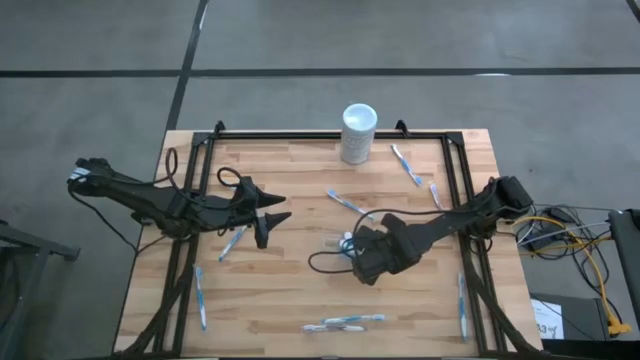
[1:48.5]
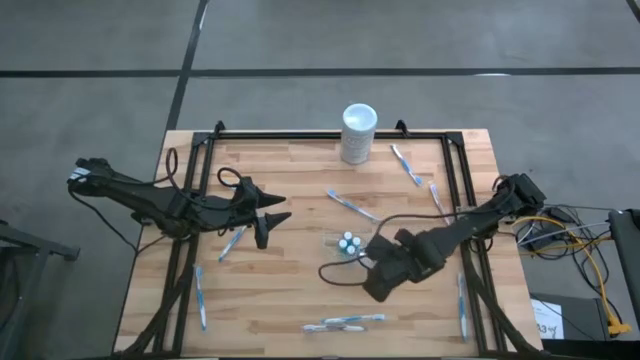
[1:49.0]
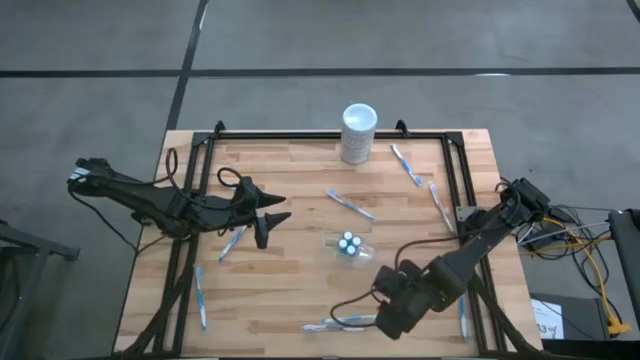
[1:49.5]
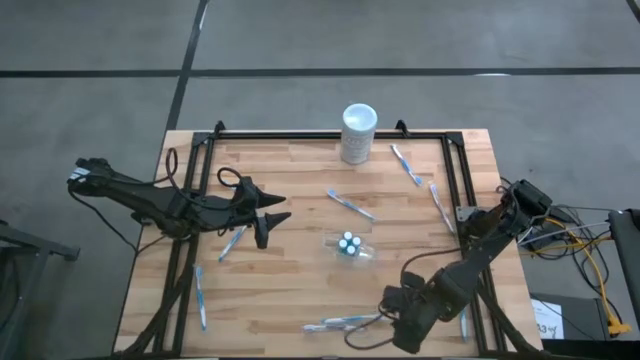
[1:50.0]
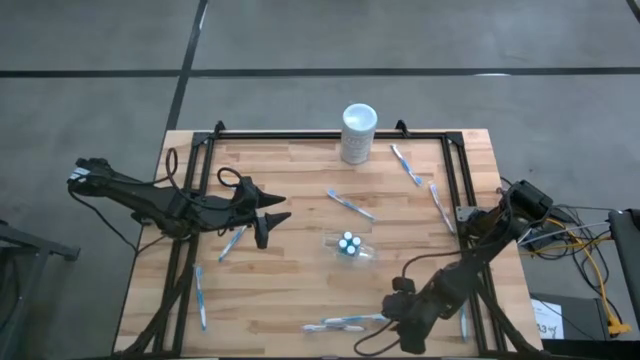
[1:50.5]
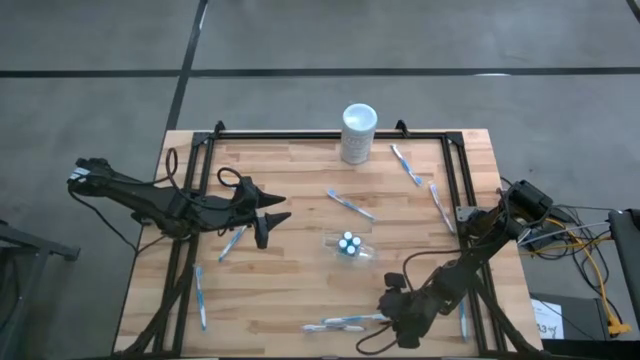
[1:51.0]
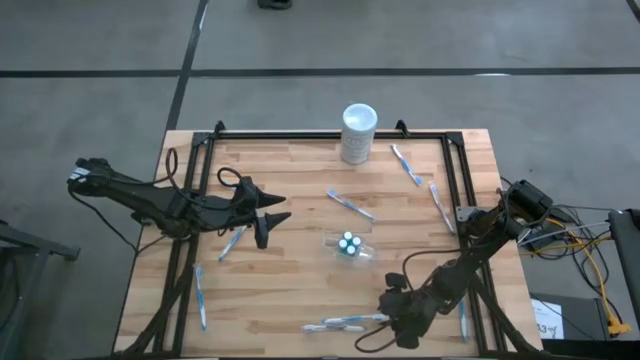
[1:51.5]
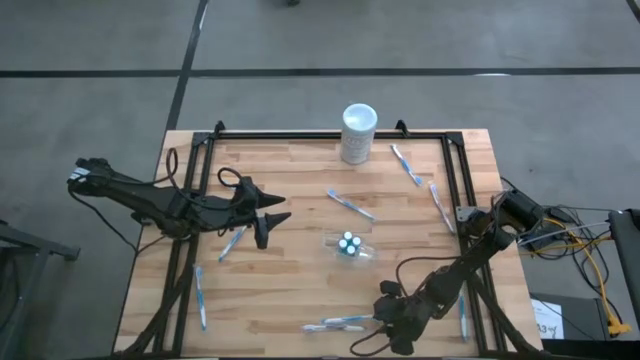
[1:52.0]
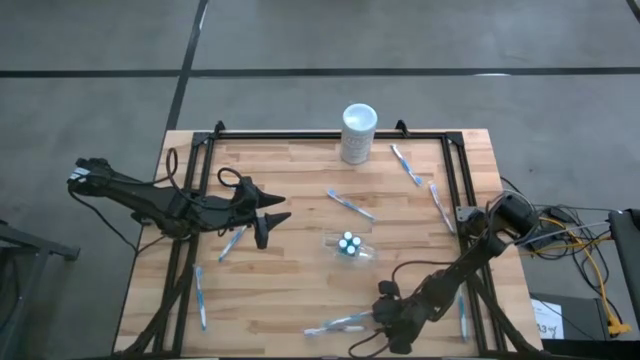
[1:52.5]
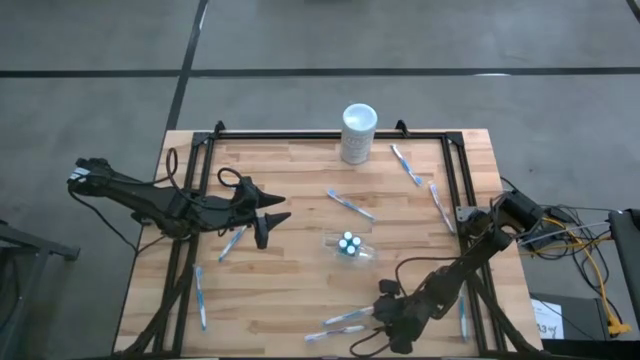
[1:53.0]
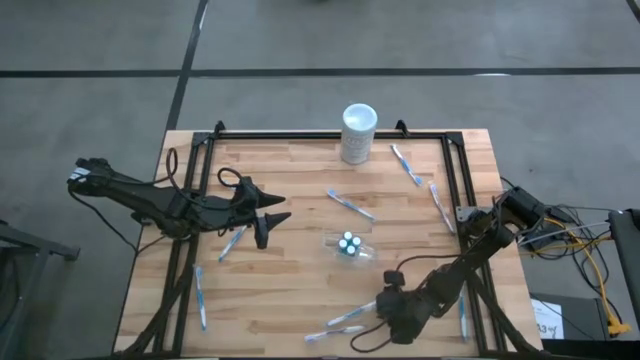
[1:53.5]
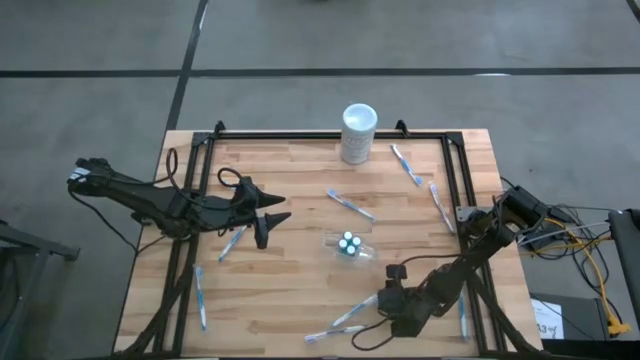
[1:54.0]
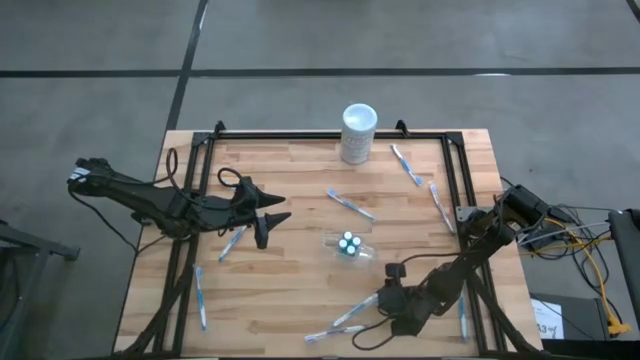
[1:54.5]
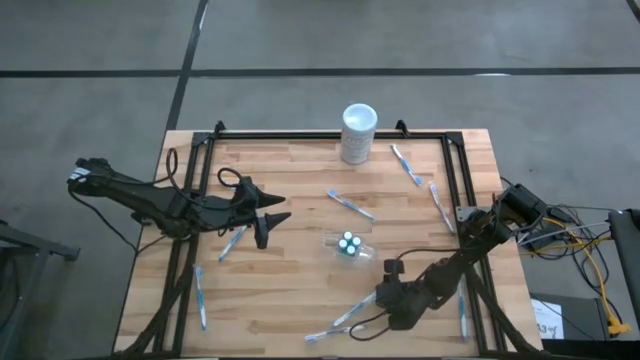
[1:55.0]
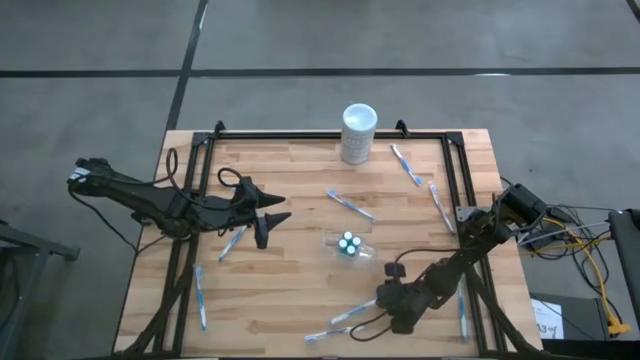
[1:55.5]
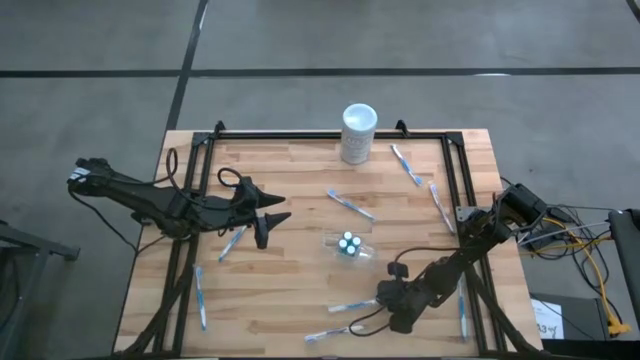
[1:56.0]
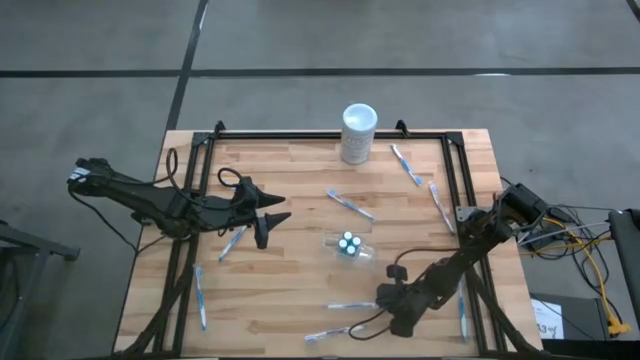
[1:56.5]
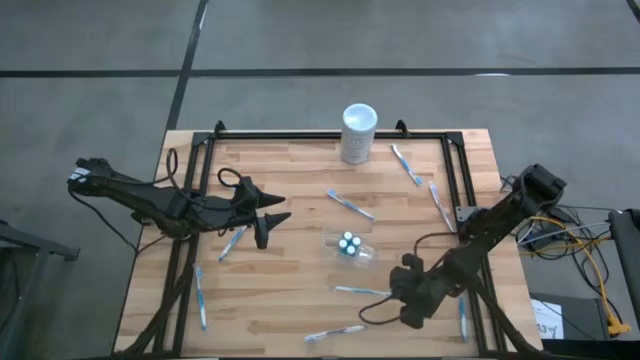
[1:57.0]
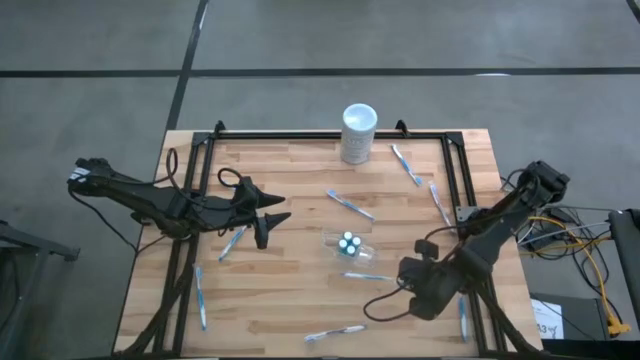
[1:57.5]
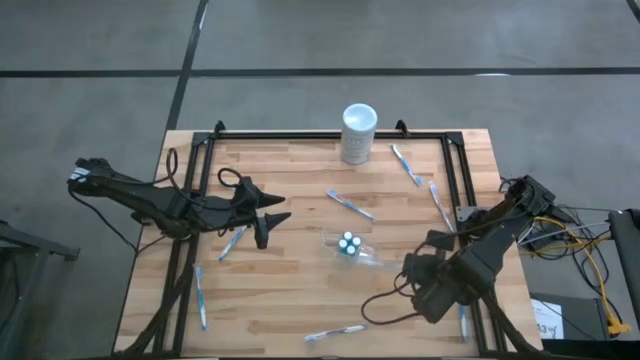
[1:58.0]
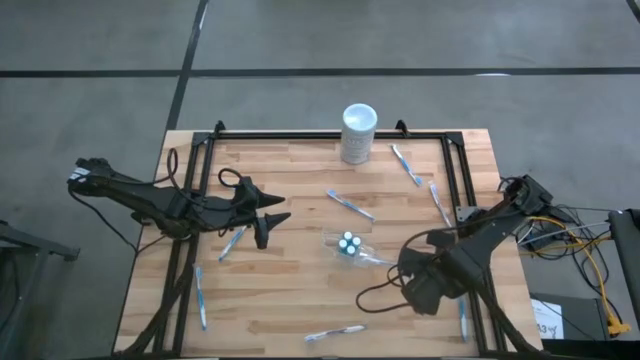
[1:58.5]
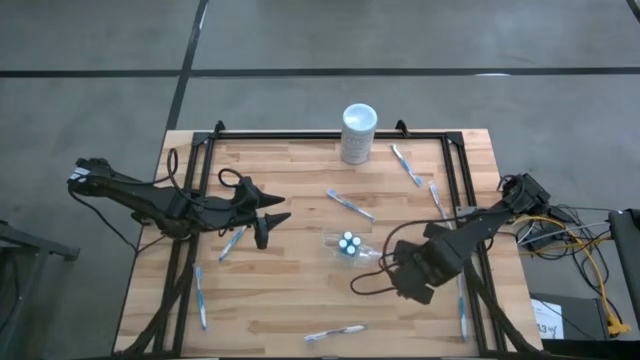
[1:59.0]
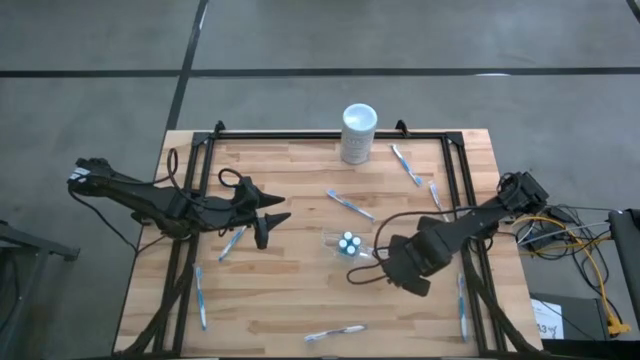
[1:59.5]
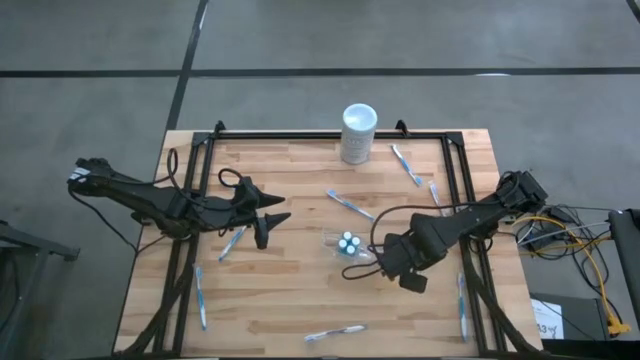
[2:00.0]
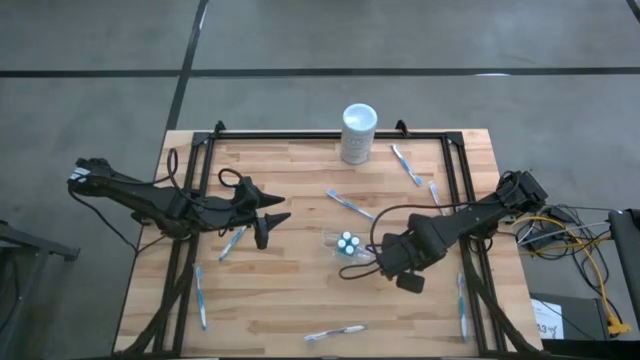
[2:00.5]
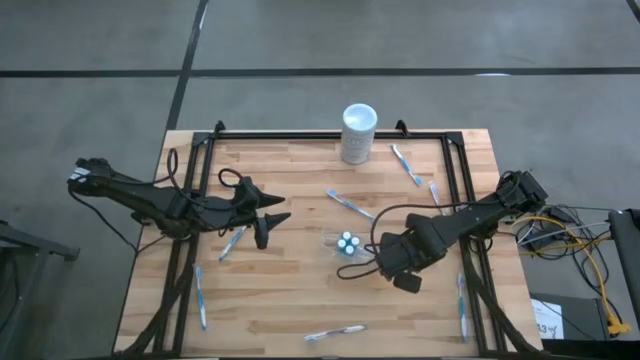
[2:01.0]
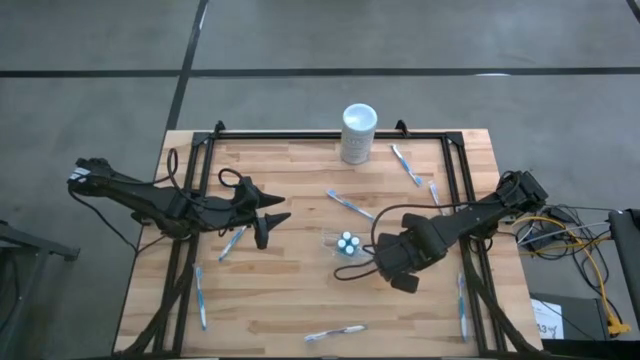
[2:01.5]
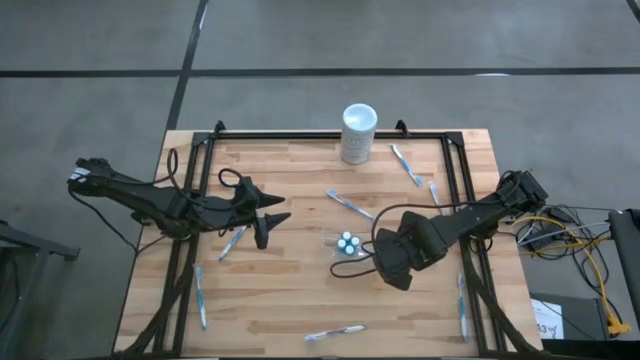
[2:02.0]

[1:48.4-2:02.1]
Task: Pick & Place toothbrushing station
Put the blue toothbrush into the transparent organizer

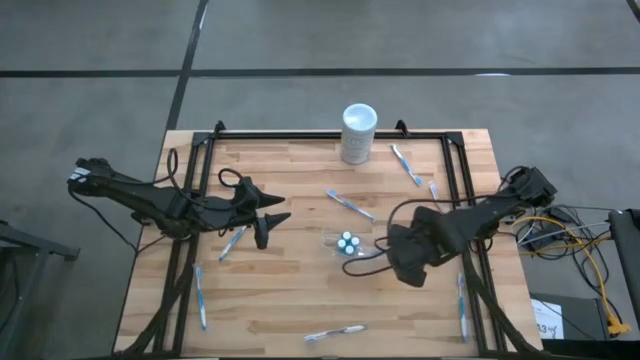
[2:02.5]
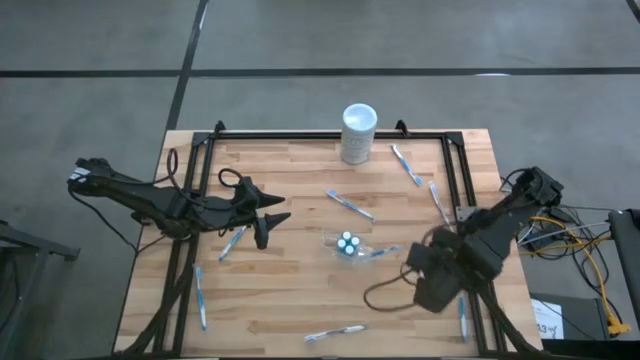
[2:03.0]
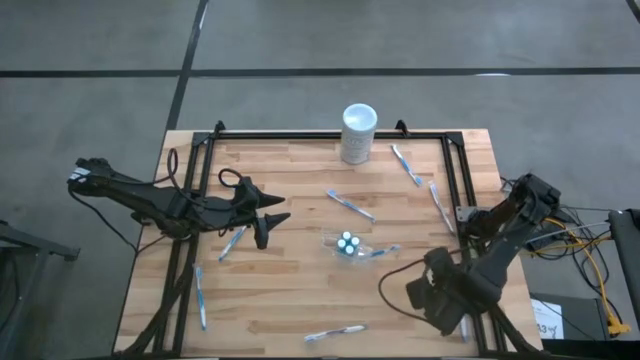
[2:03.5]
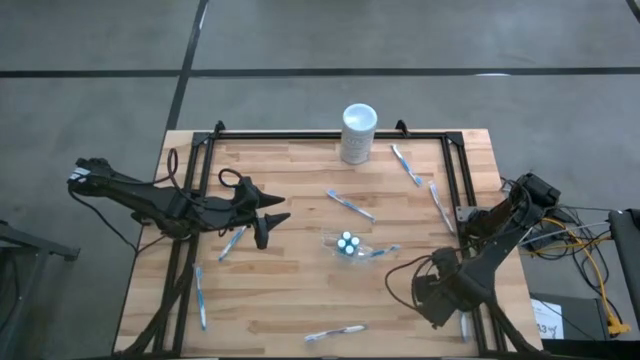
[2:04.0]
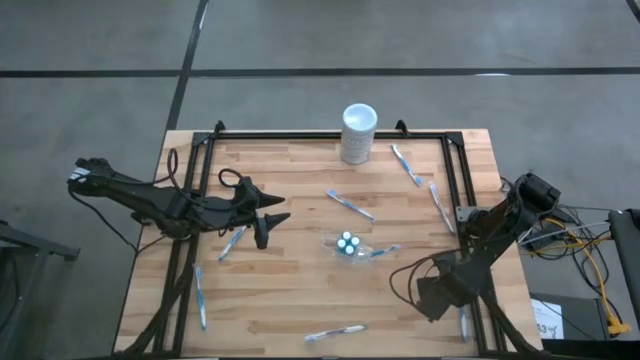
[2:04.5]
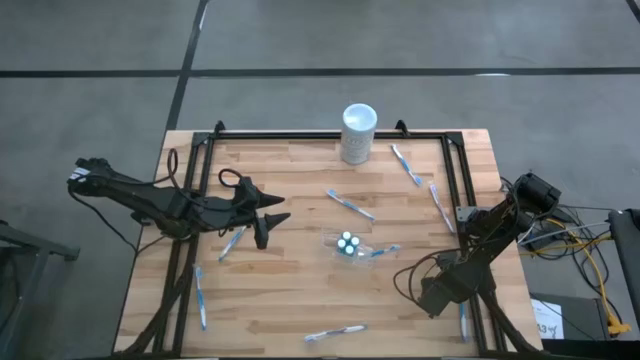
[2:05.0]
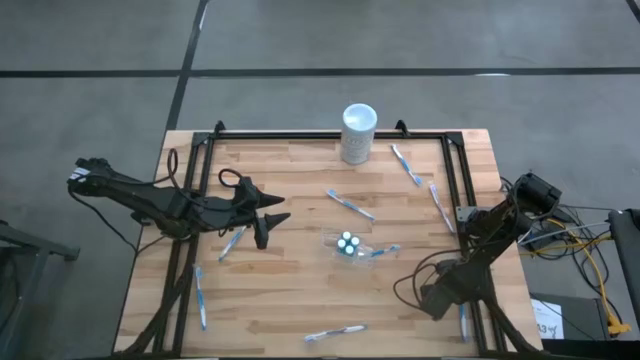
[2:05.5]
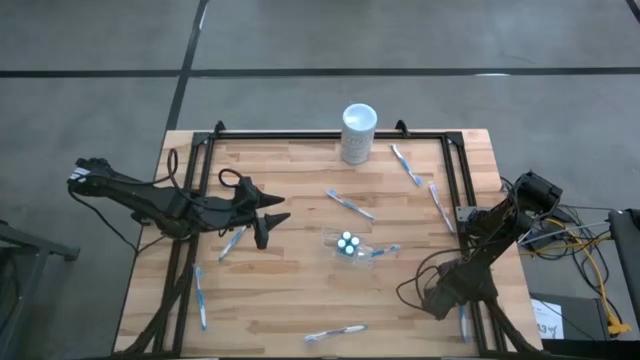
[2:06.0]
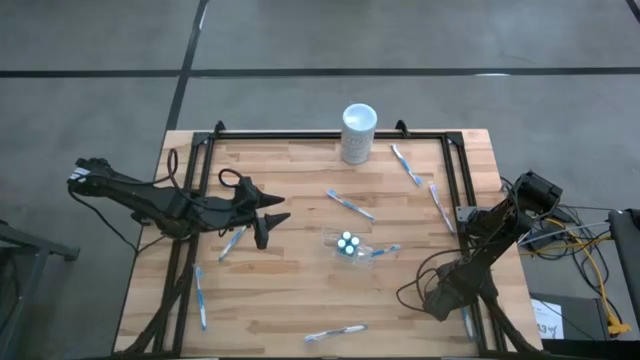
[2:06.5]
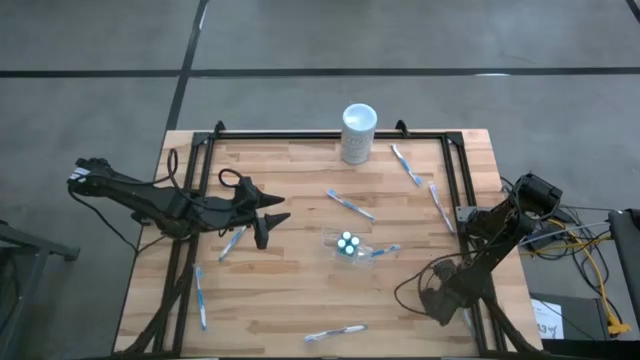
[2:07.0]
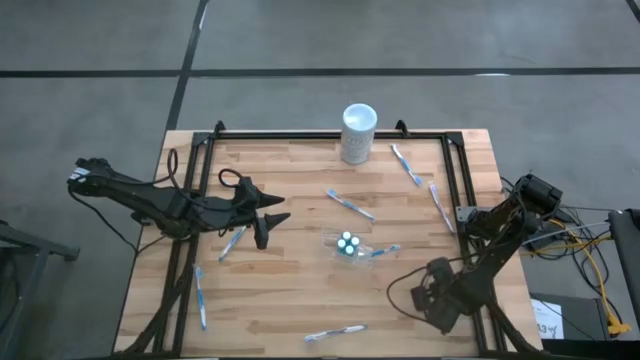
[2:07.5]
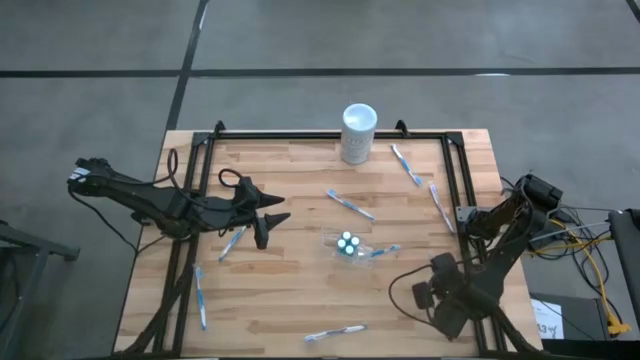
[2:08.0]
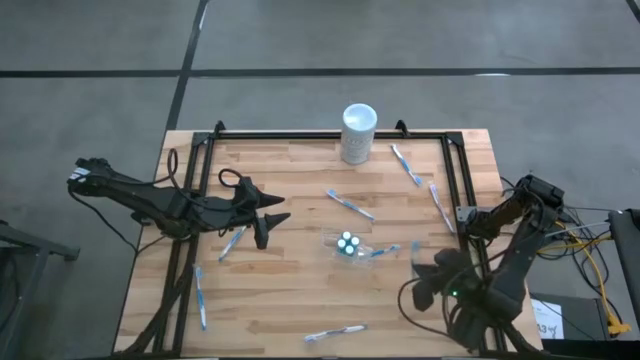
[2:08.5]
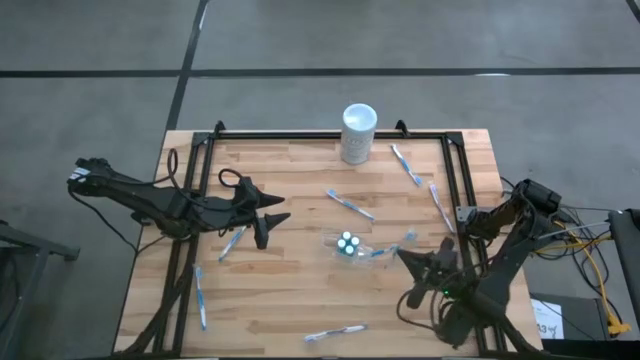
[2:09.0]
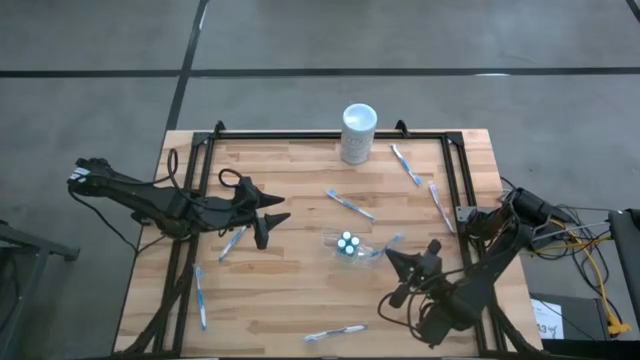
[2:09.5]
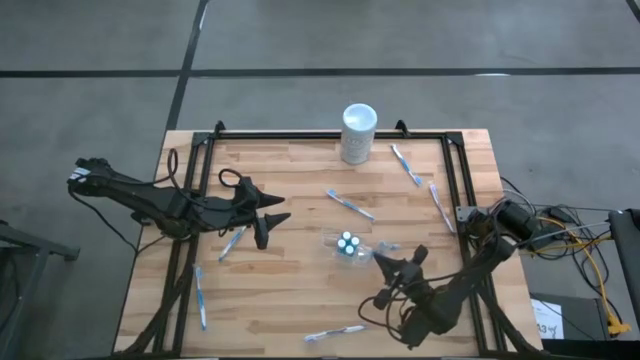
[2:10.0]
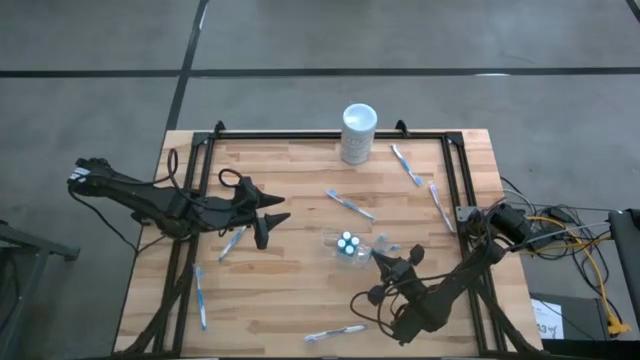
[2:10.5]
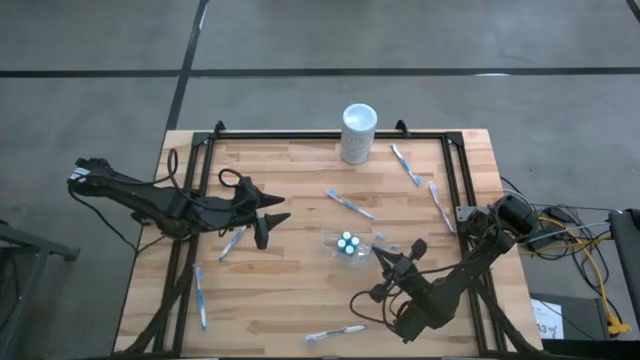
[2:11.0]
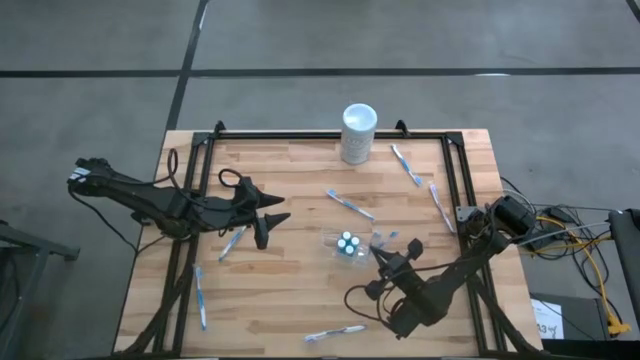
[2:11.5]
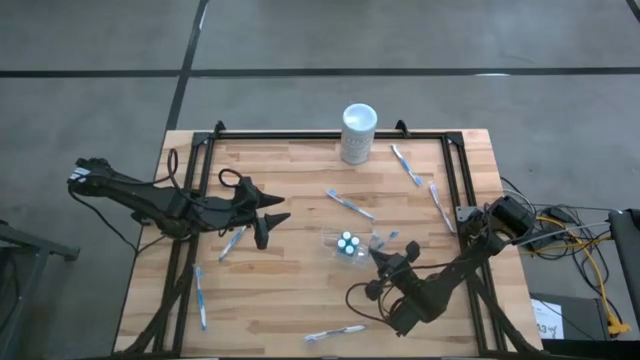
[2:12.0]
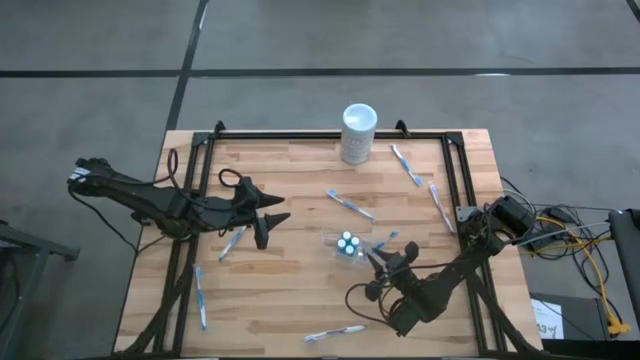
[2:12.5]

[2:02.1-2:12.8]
Put the blue toothbrush into the transparent organizer
